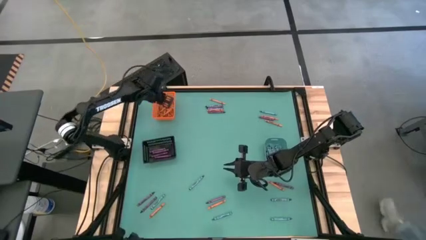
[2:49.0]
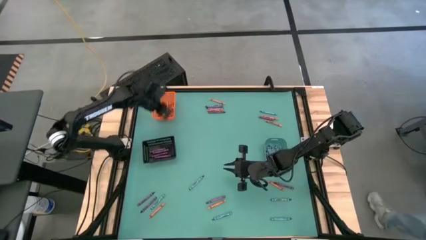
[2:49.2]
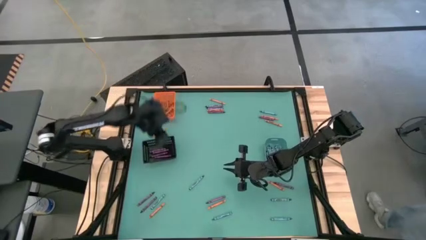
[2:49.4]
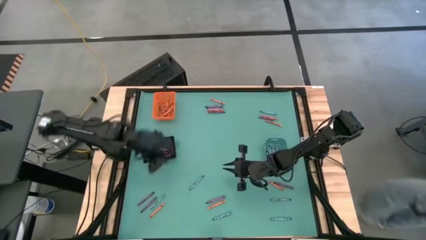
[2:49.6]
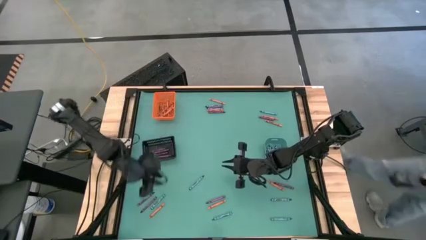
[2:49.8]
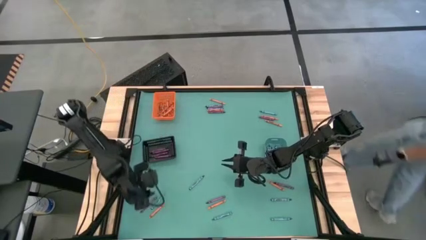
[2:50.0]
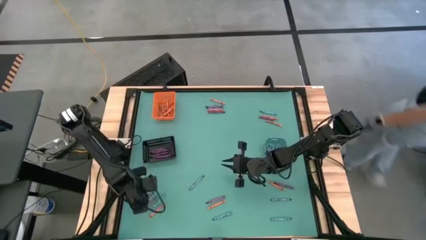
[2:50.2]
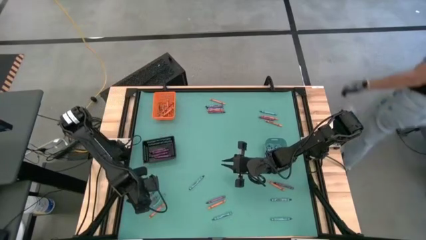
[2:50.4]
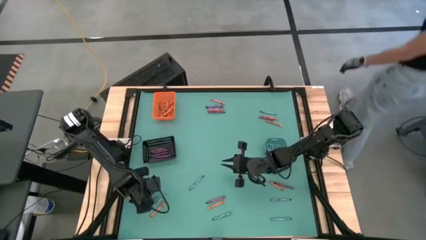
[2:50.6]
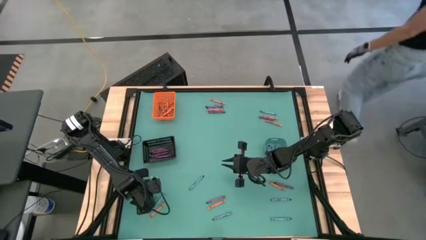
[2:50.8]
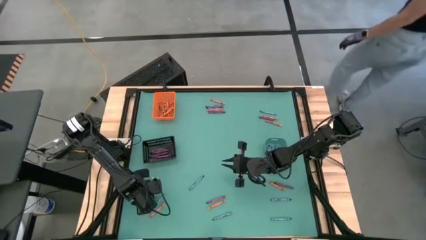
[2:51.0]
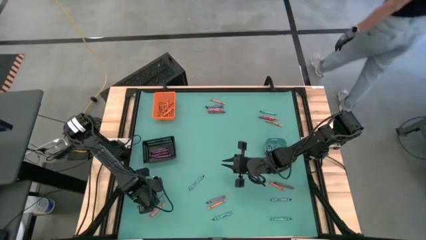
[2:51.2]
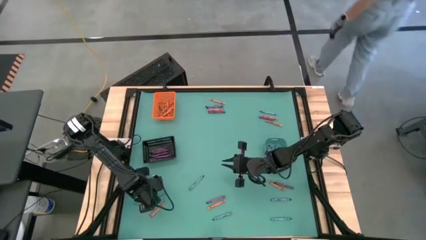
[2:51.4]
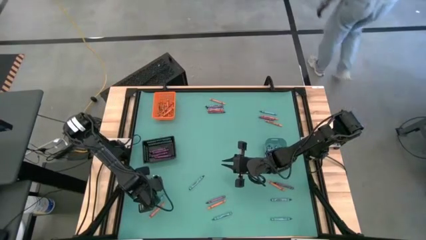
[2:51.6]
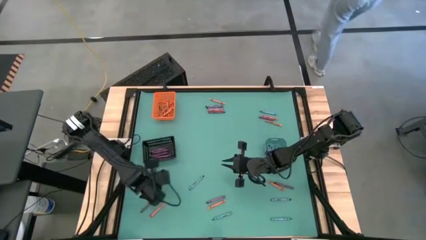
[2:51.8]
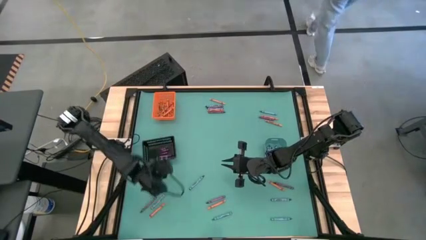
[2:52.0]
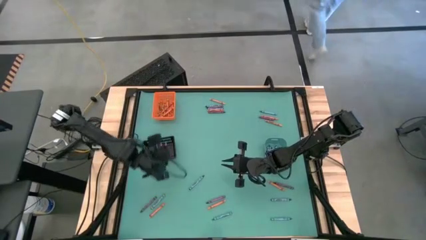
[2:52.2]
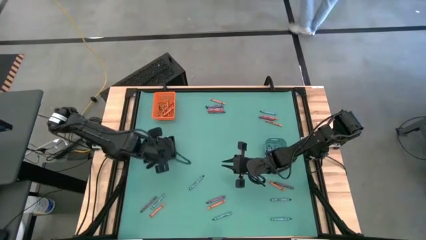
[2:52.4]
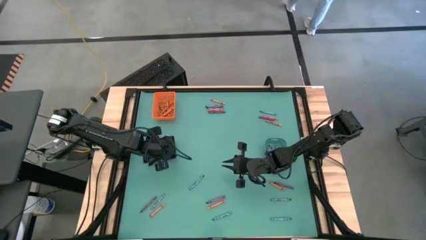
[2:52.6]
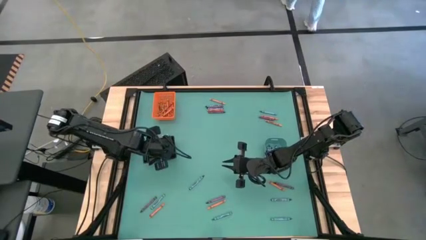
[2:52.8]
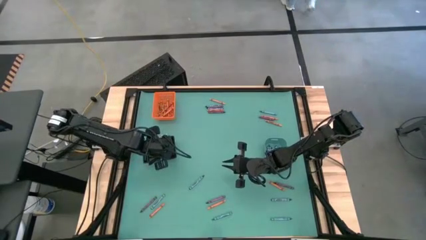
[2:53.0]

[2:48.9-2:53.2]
Task: Sort crayons
Put the violet crayon into the black bin

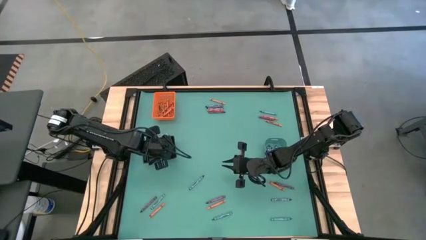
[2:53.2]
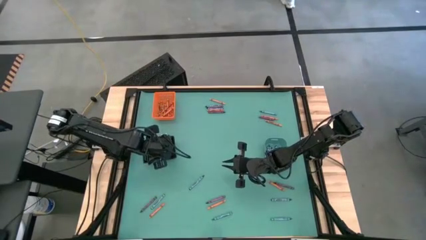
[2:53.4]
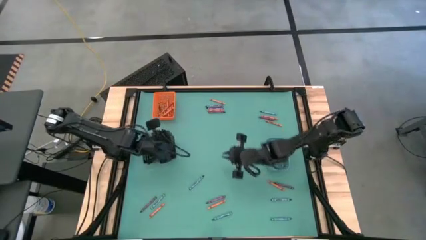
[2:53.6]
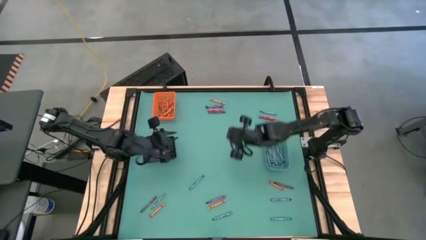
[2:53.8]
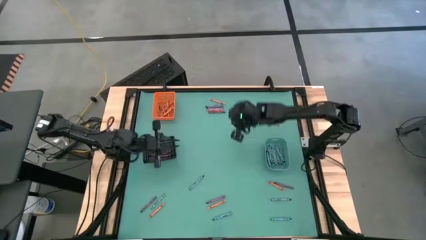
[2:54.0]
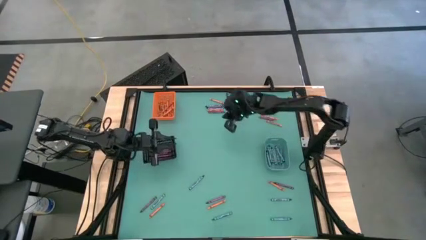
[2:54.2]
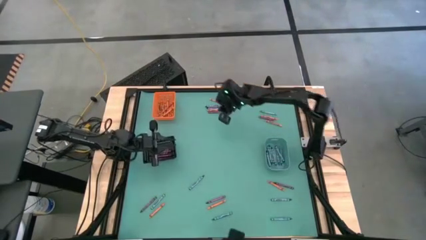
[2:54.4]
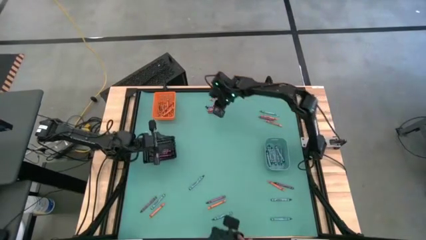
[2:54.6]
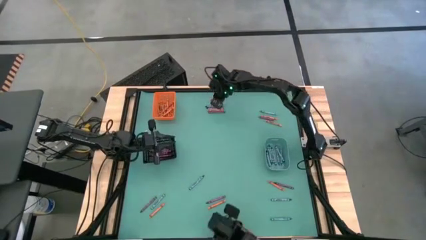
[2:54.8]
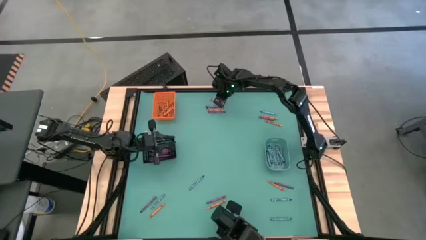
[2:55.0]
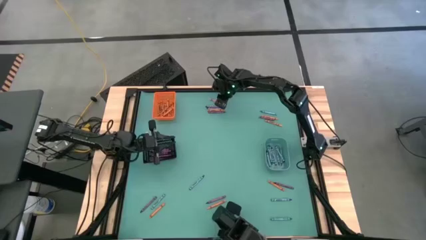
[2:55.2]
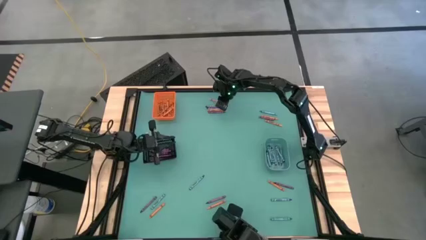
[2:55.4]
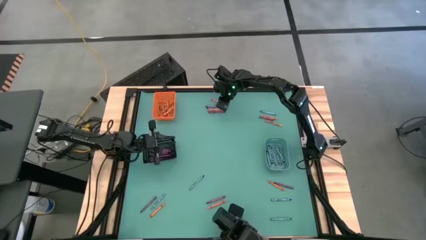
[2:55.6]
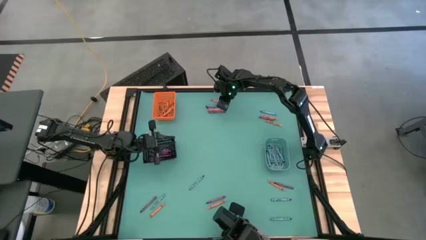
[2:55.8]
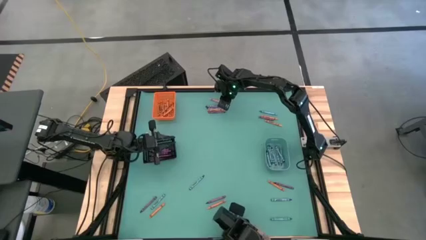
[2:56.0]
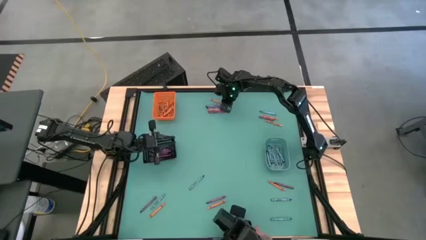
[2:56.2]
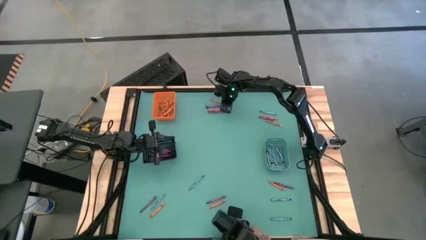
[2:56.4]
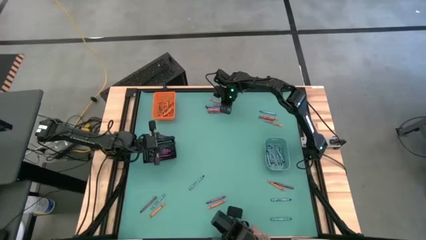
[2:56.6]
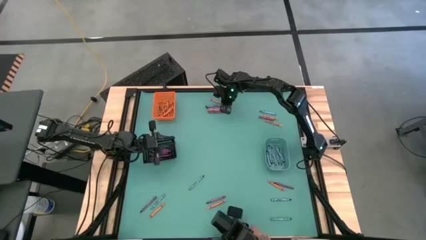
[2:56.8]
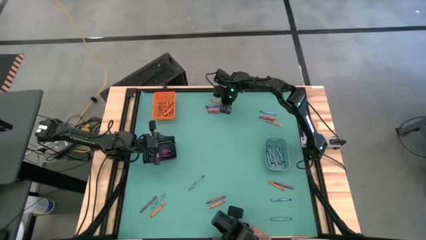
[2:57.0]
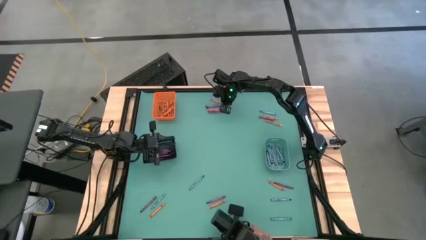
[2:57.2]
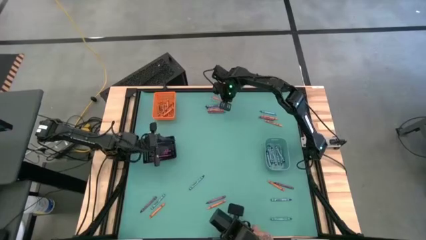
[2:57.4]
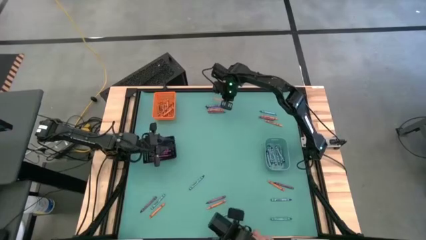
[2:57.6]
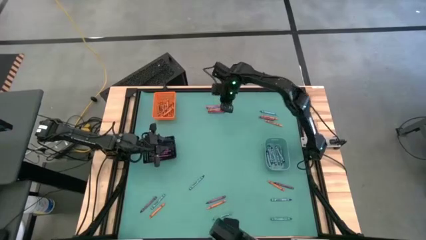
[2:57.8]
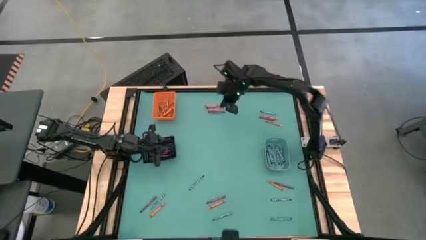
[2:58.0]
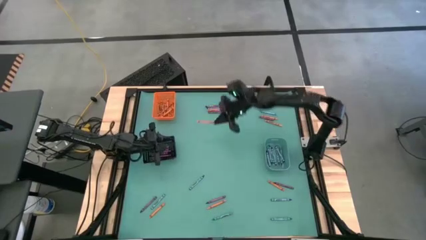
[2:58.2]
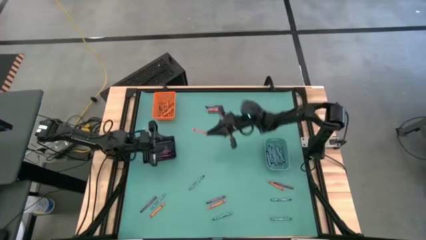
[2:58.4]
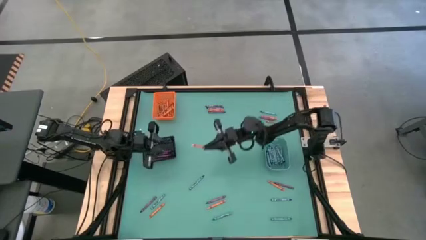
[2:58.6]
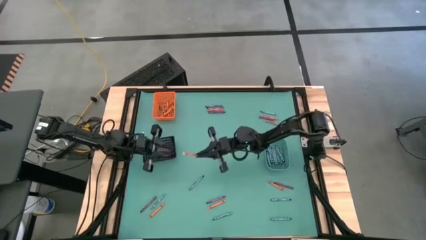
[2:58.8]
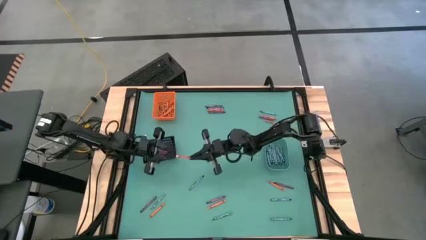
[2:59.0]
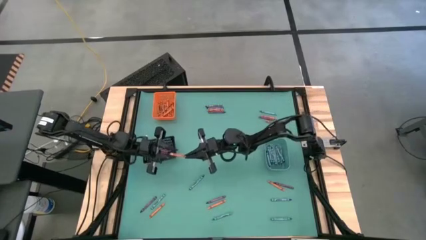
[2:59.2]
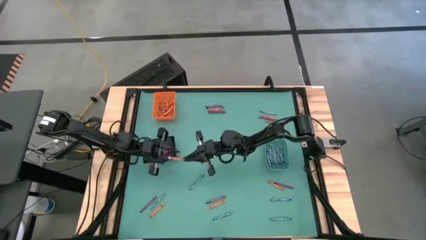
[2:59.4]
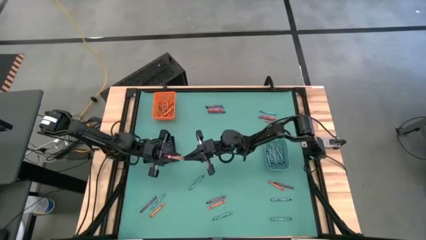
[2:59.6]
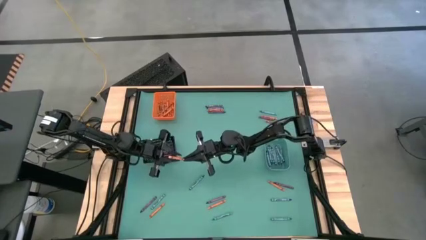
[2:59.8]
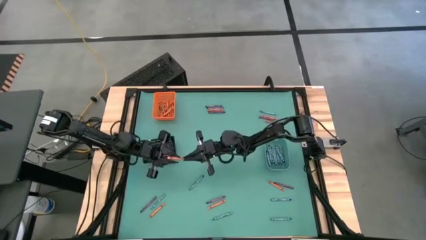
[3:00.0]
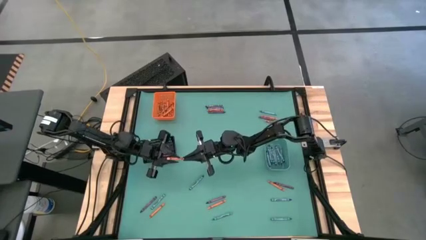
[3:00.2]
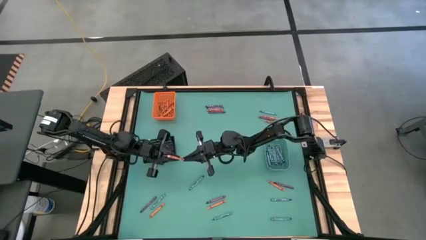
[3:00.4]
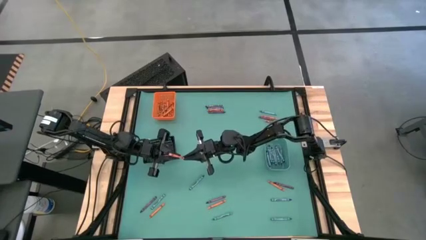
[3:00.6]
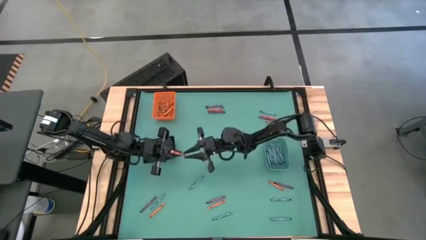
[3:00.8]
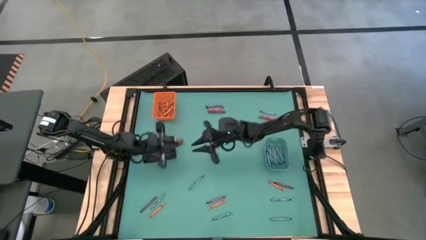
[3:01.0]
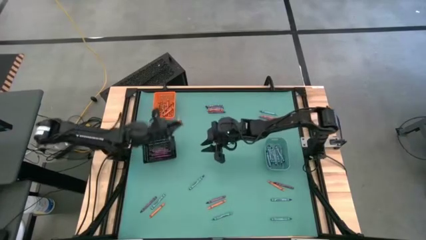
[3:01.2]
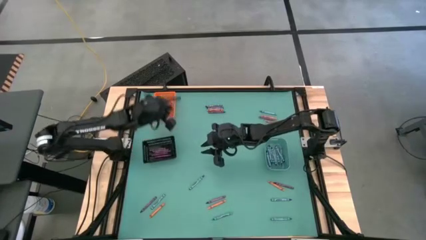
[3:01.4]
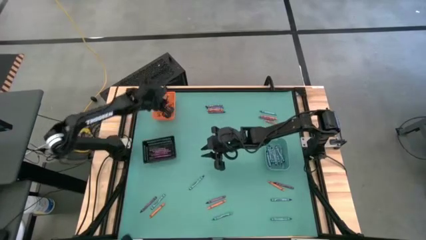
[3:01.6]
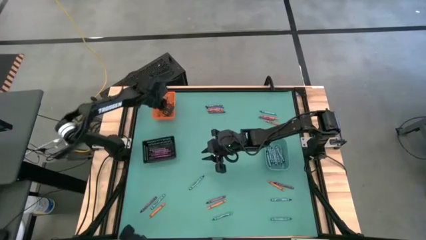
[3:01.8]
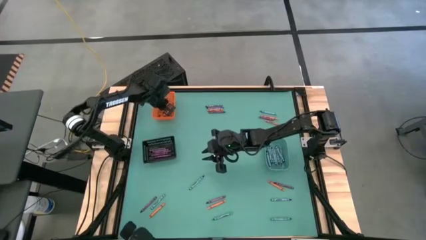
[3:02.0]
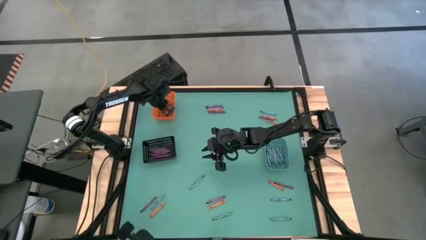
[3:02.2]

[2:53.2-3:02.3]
Put the orange crayon into the orange bin

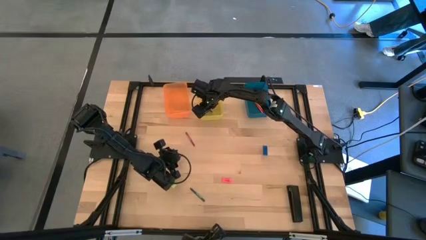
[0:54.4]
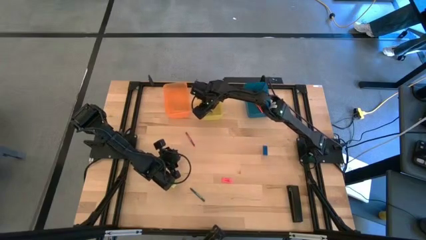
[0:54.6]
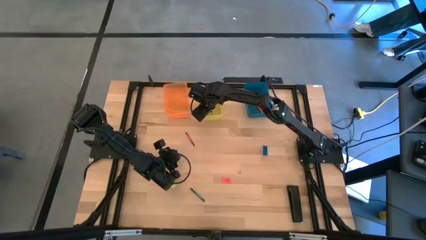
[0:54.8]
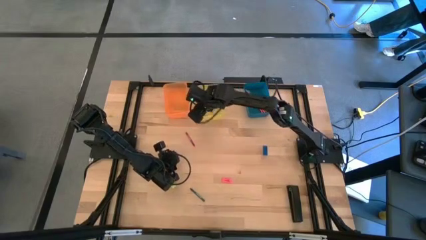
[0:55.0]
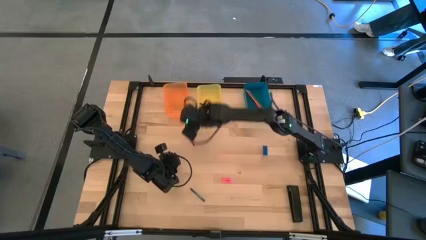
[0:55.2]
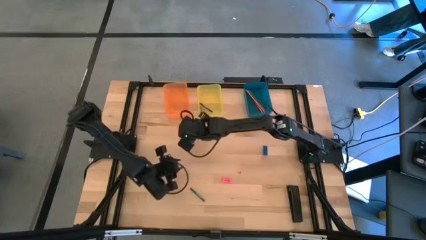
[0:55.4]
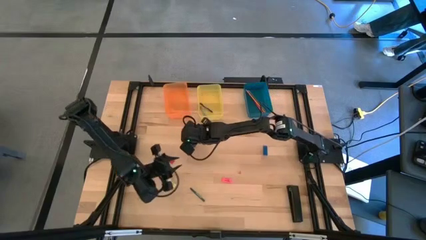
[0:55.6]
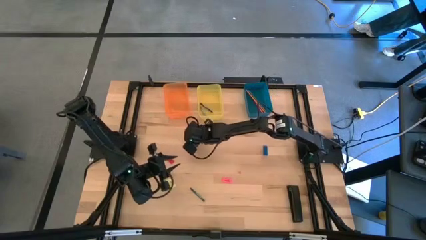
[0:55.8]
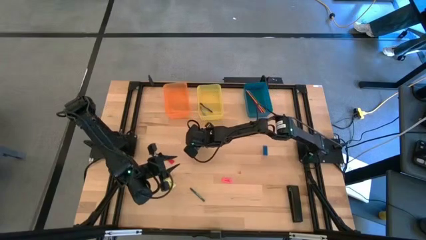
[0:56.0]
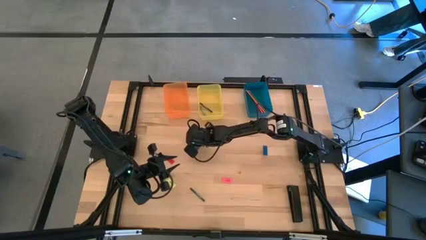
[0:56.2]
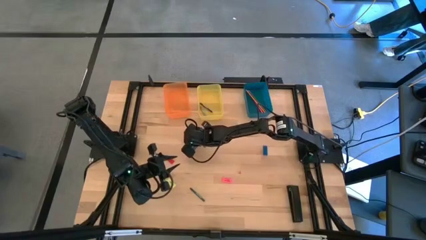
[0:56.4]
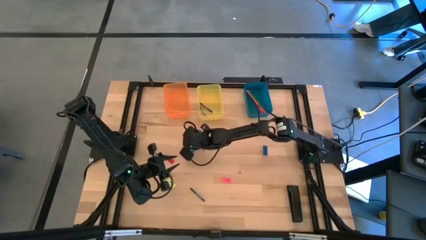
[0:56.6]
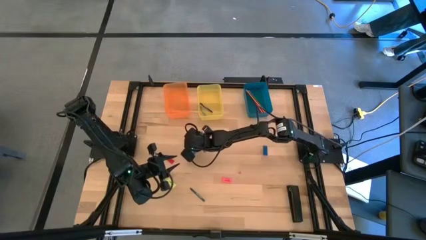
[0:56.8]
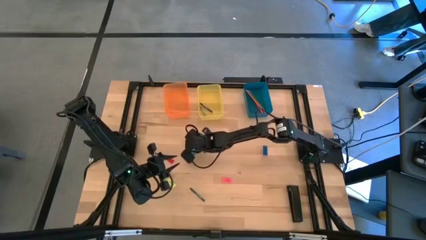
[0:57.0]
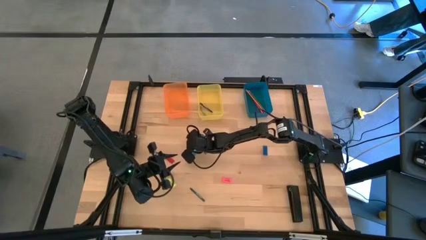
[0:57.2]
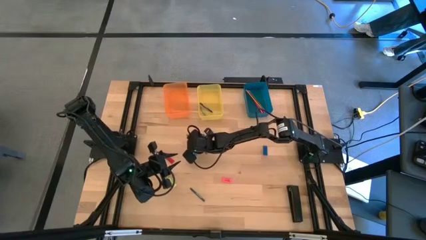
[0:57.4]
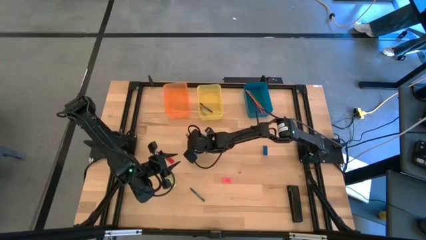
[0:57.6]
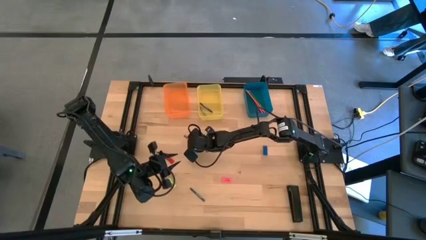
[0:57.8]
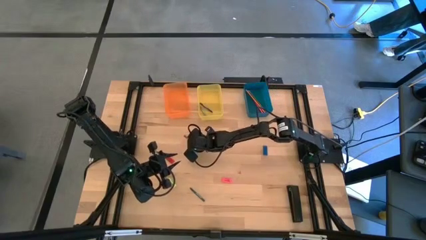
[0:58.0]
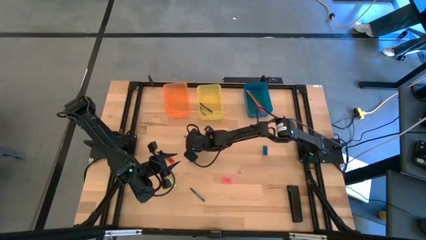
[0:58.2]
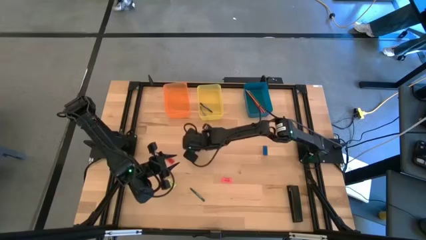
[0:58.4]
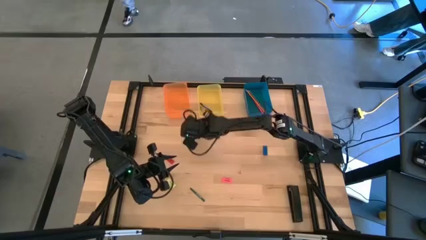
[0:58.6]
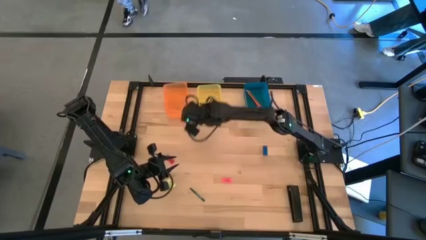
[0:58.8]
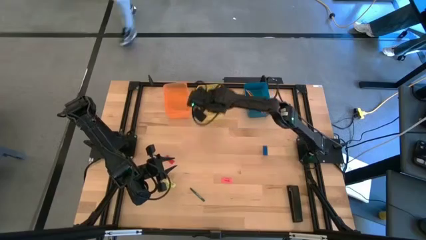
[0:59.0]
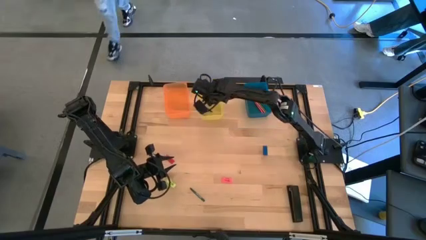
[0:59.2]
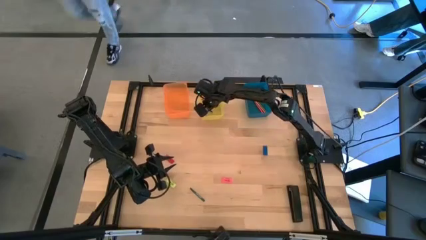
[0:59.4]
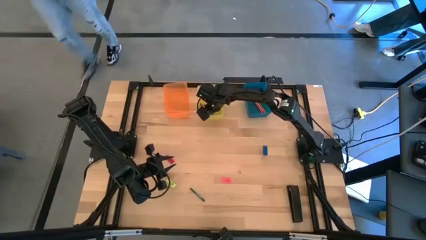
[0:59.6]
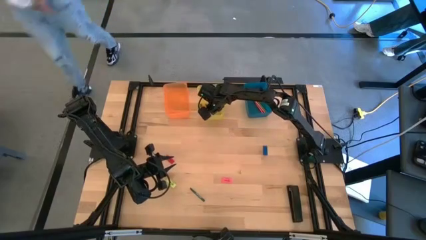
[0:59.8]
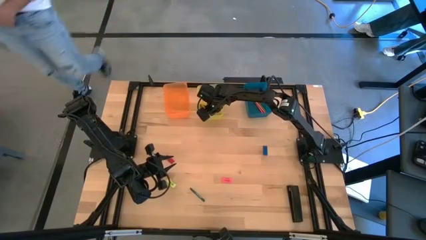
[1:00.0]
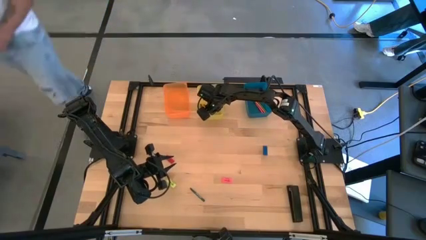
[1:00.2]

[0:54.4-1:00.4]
Task: Sort crayons/erasers/pens/pencils in bins
Put the red crayon into the yellow bin
